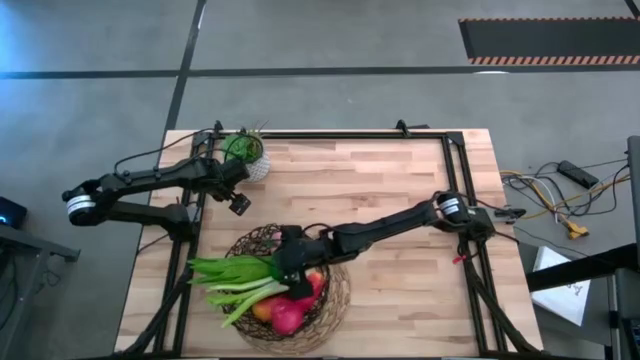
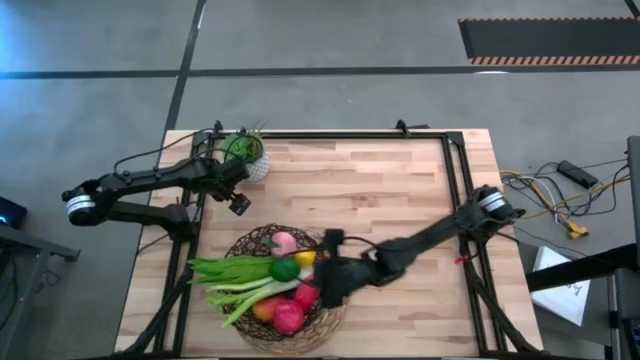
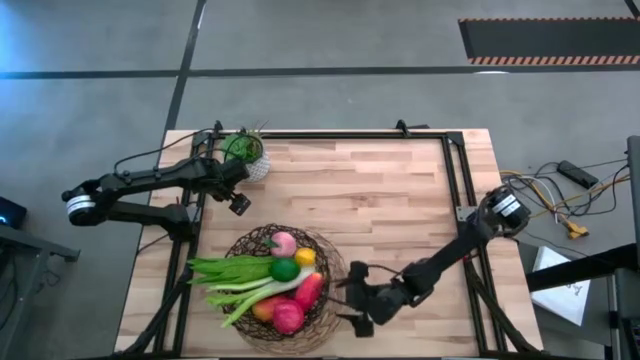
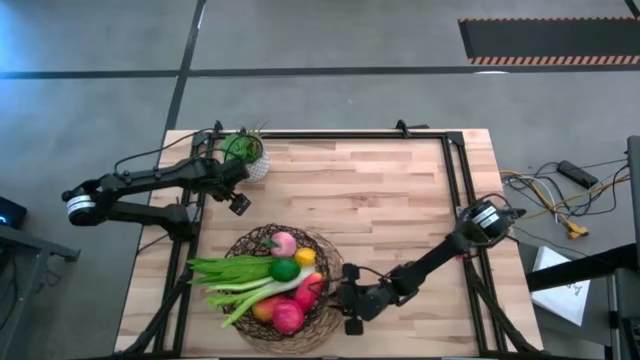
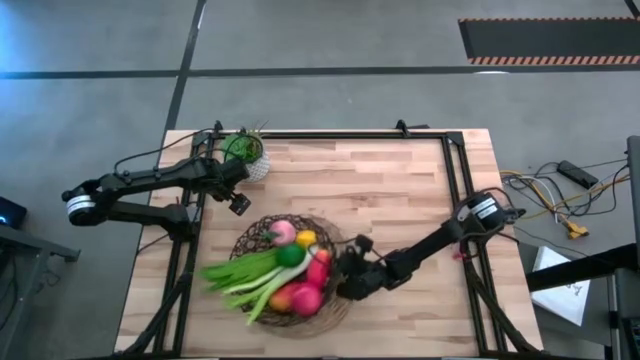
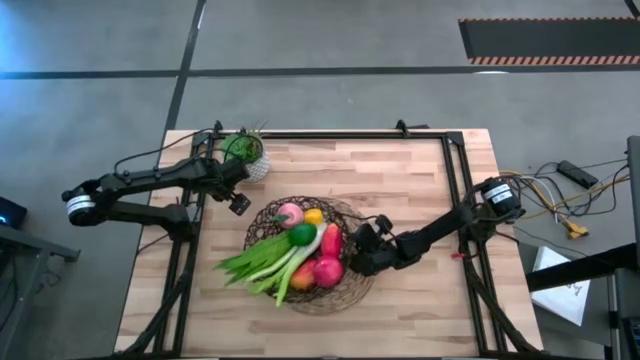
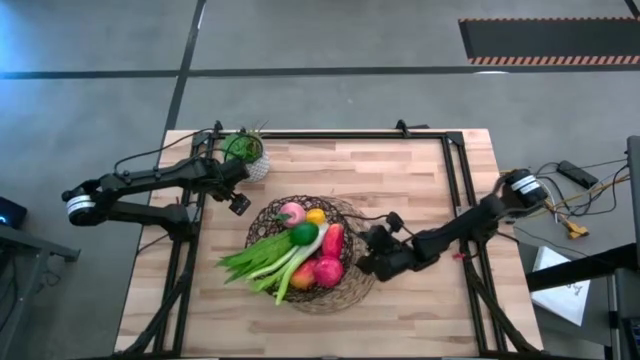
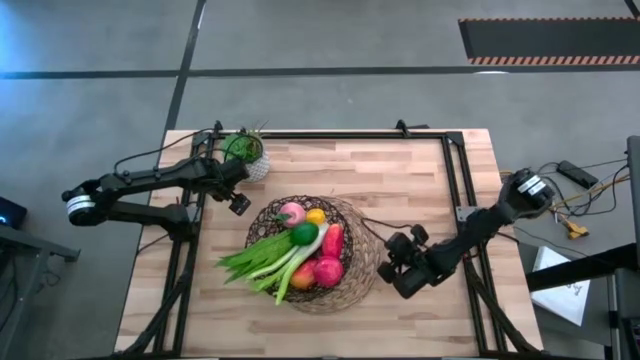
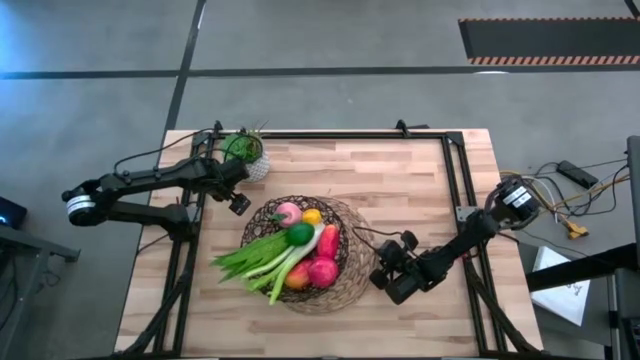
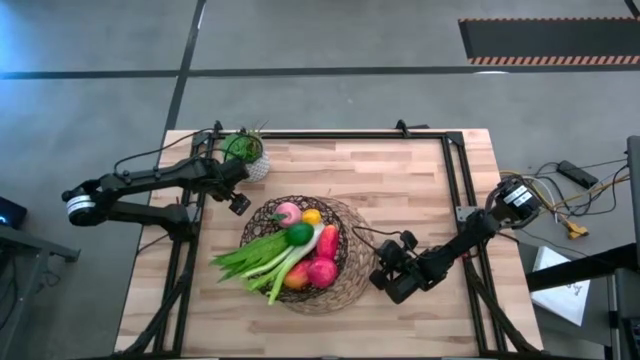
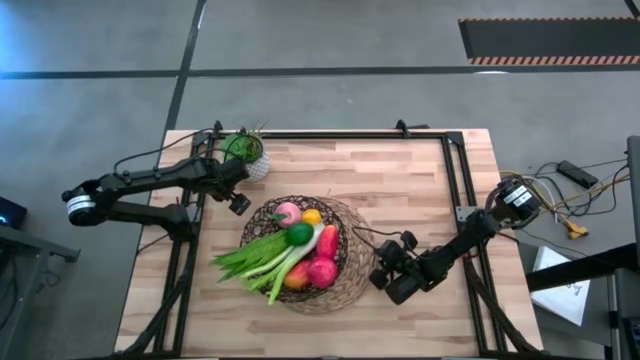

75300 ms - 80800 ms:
Task: Build produce basket
Adjust the placemat

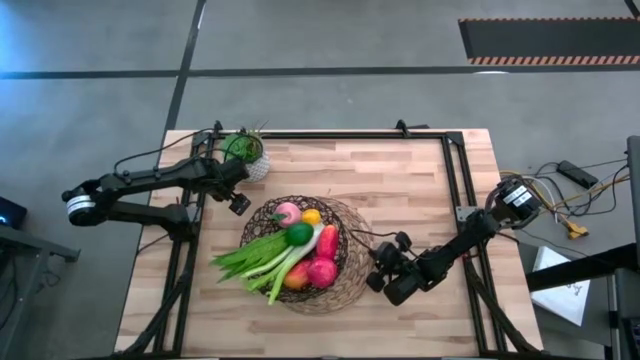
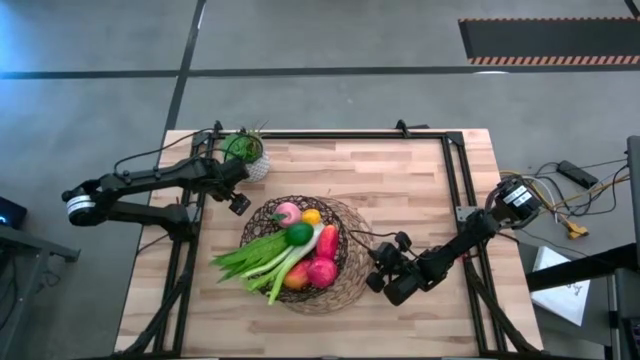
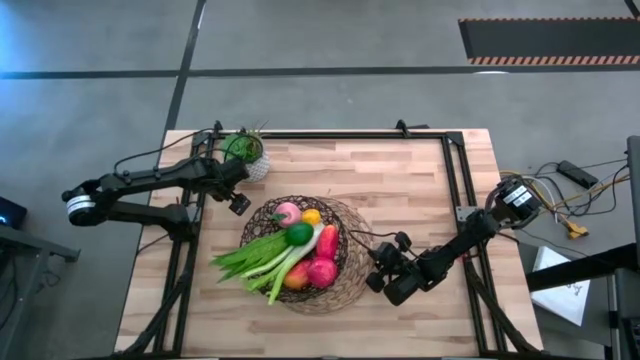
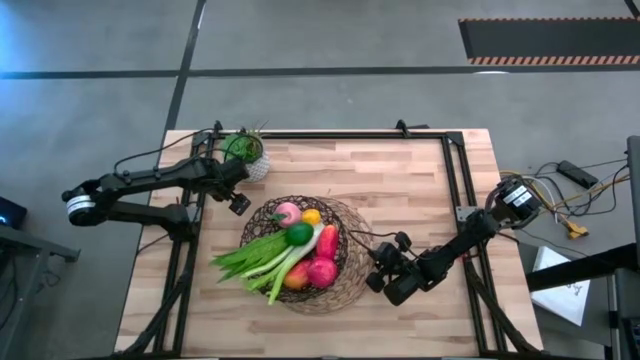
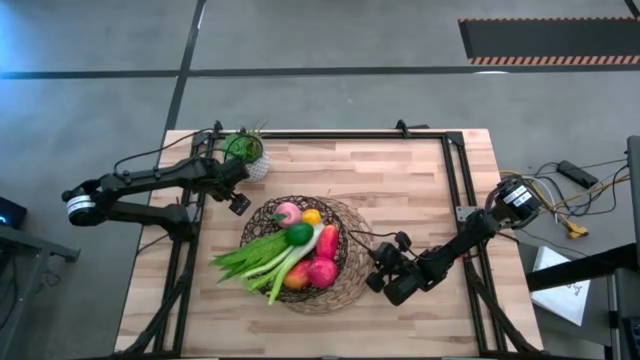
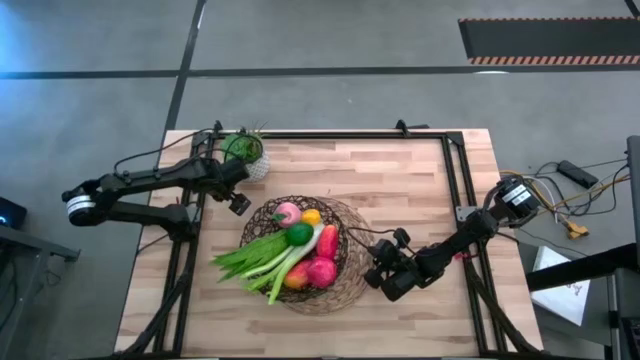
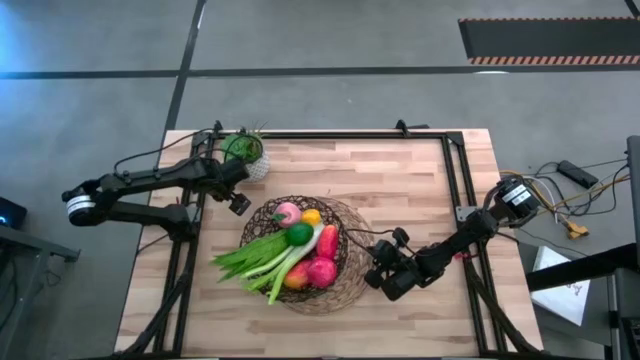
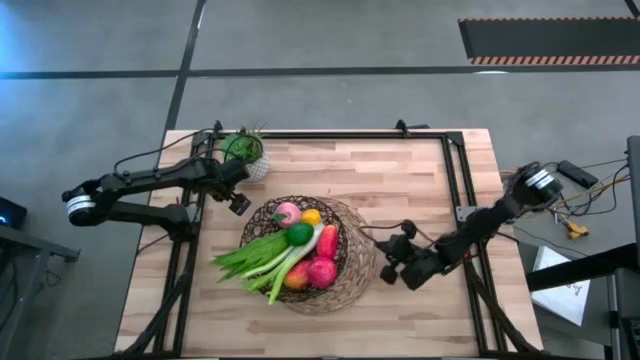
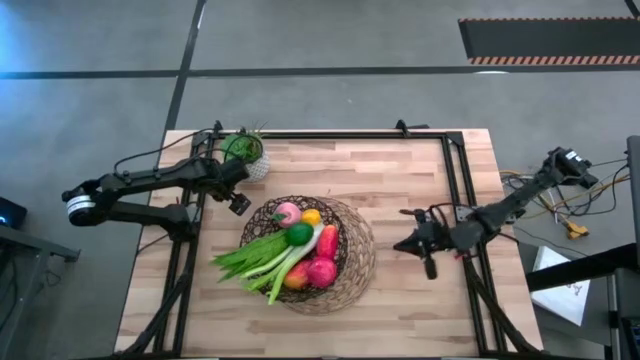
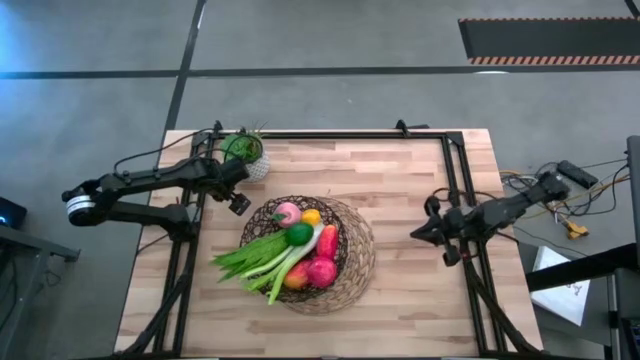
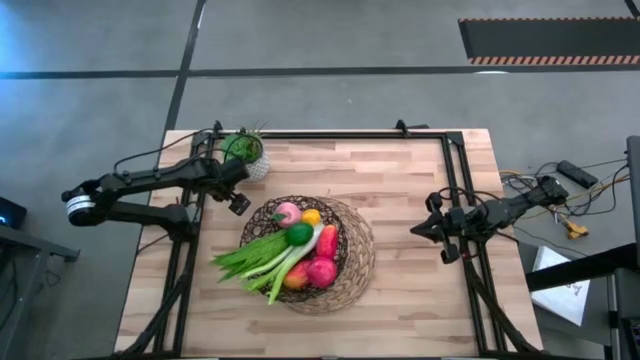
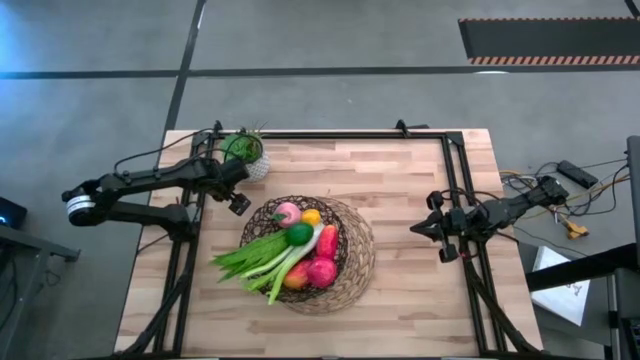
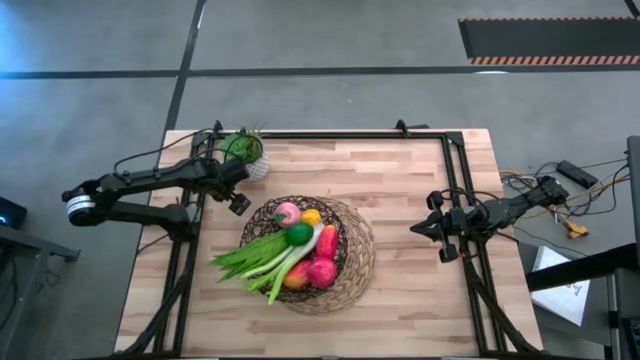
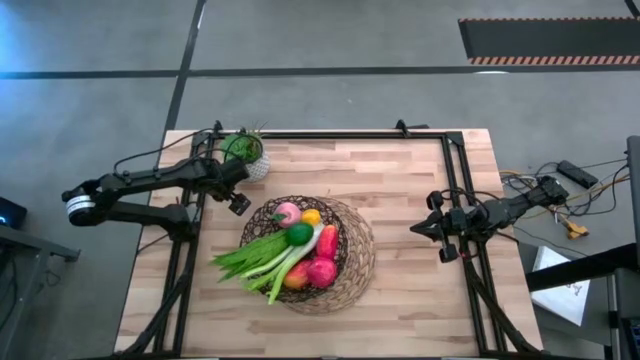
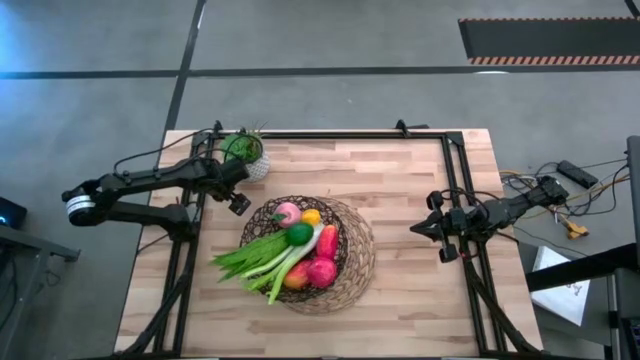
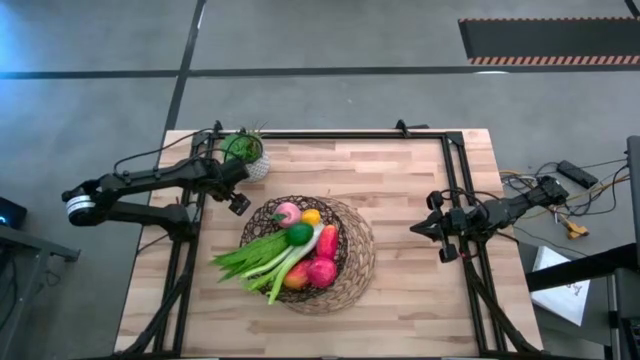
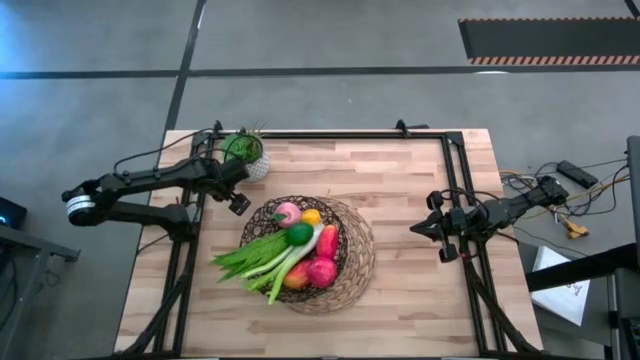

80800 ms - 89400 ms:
Return to Home Position
